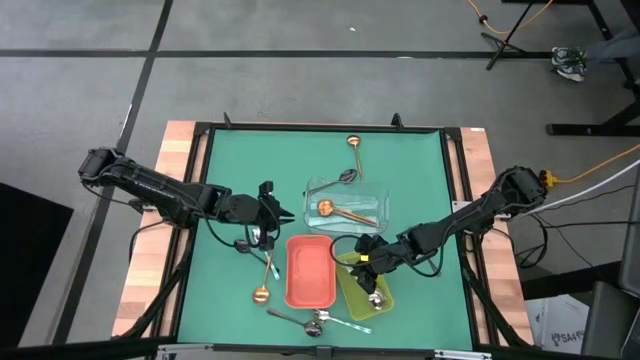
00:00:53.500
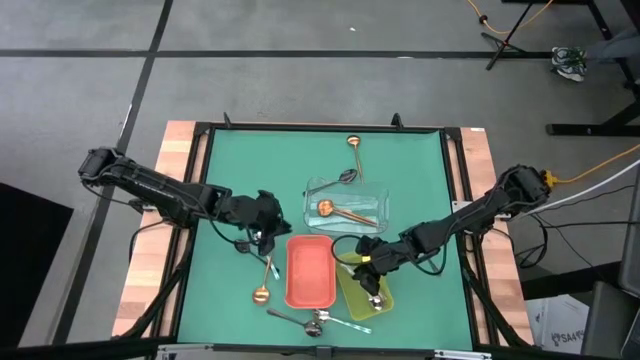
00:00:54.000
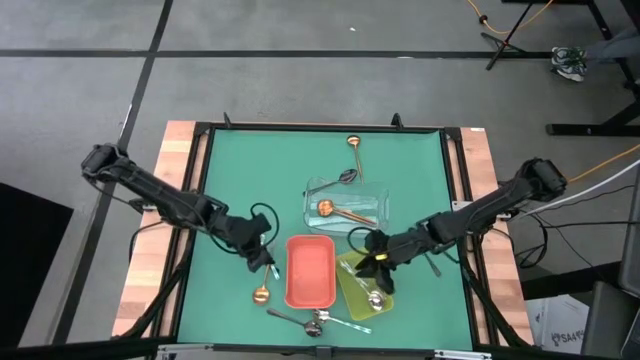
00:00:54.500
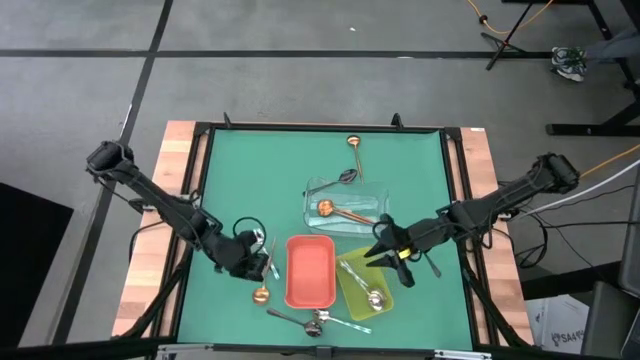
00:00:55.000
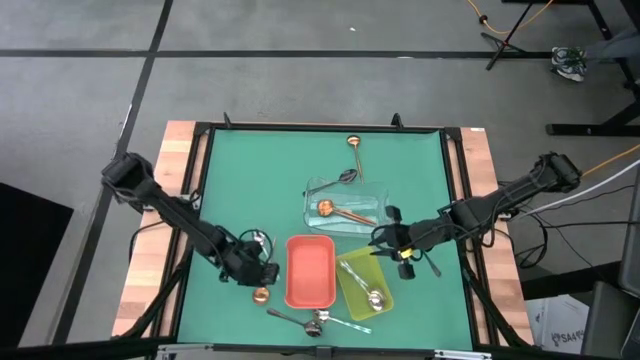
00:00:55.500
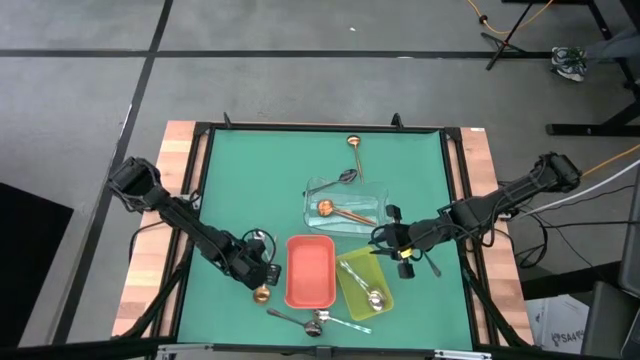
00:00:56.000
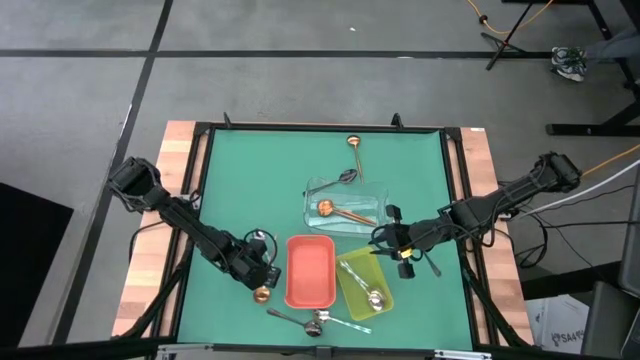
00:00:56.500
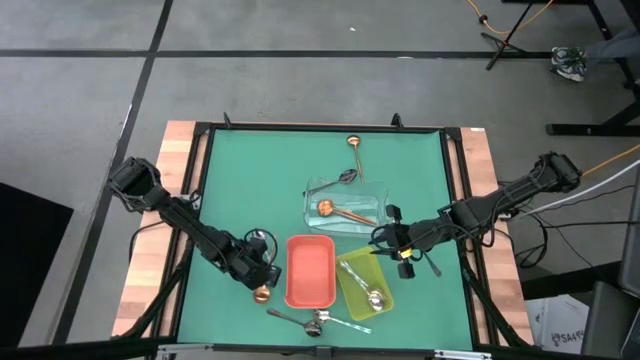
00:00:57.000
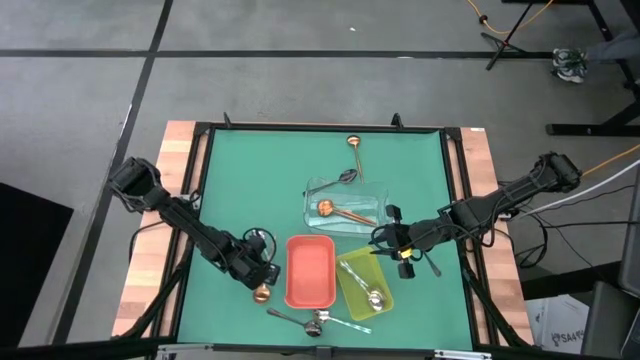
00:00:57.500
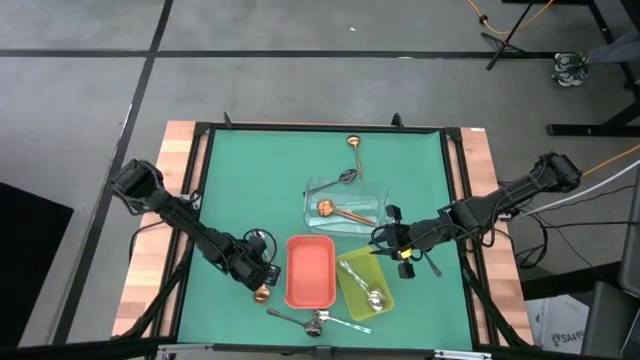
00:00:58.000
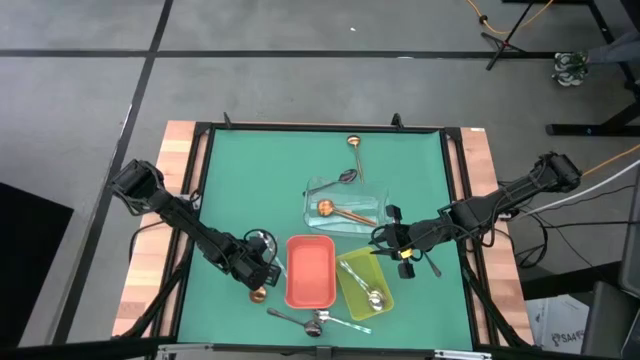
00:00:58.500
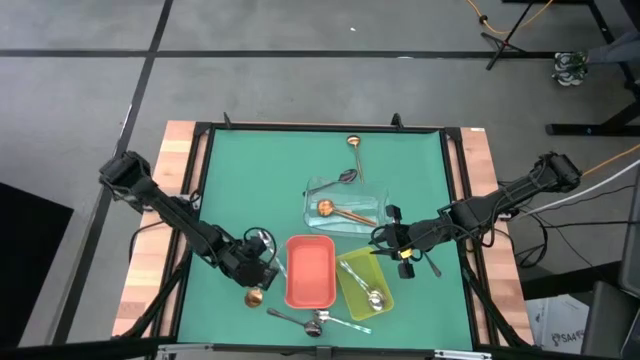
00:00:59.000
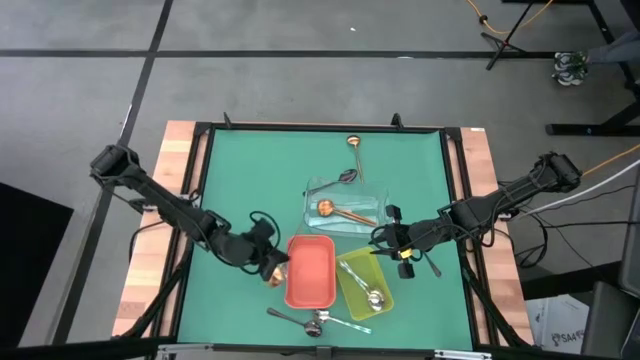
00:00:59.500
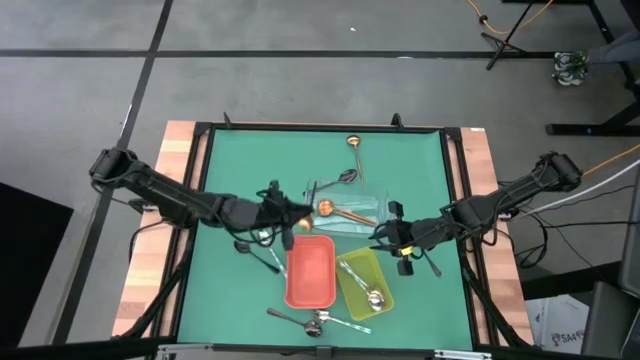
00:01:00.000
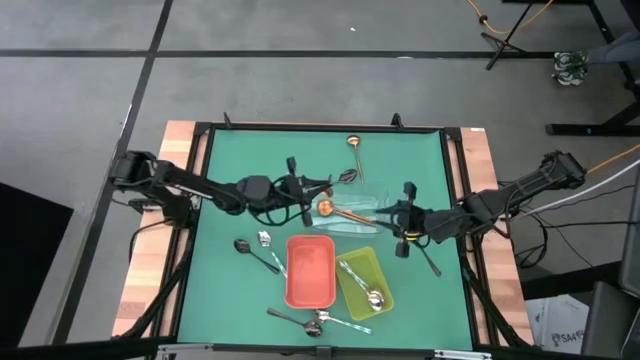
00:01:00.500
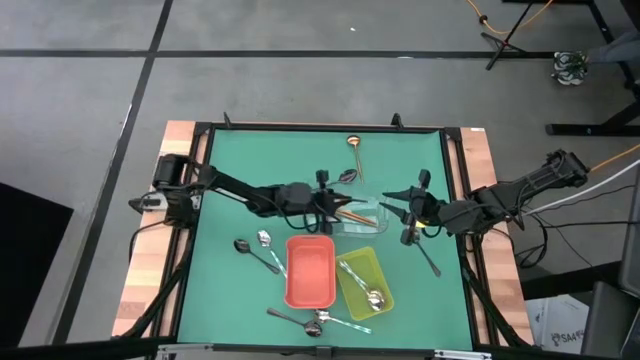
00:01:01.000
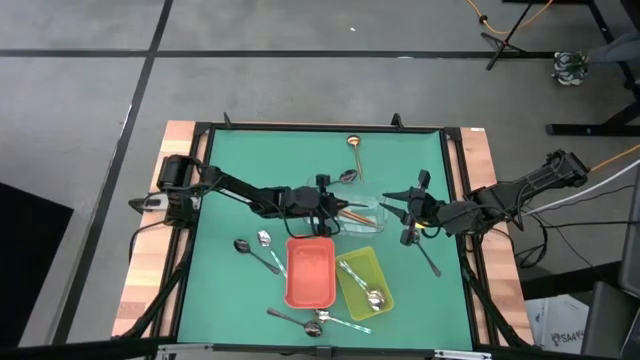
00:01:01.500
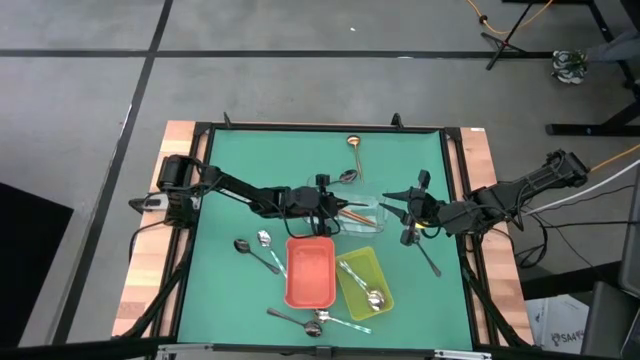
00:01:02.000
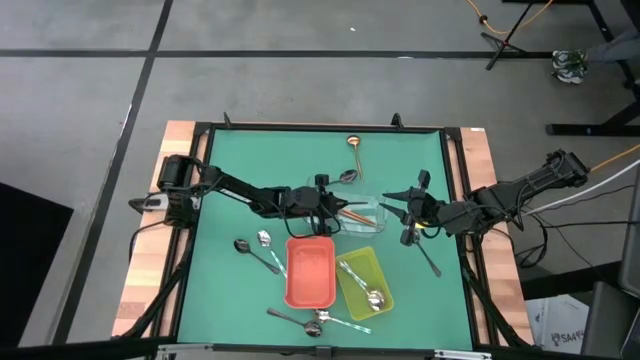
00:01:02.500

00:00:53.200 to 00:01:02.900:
Task: Sort silverware by color (type)
Put the gold spoon into the transparent bin

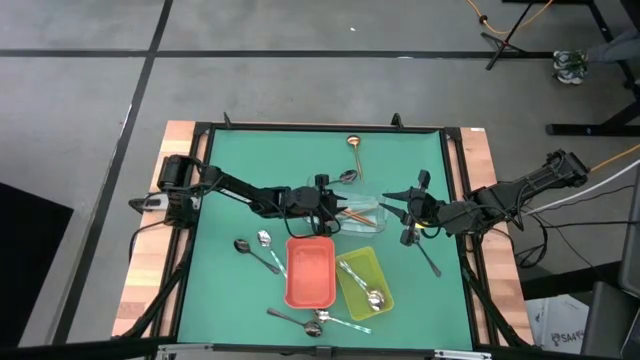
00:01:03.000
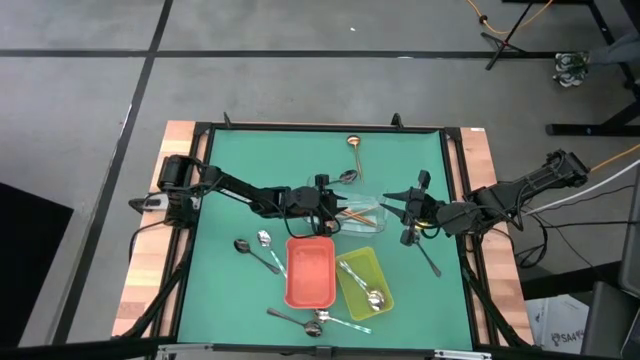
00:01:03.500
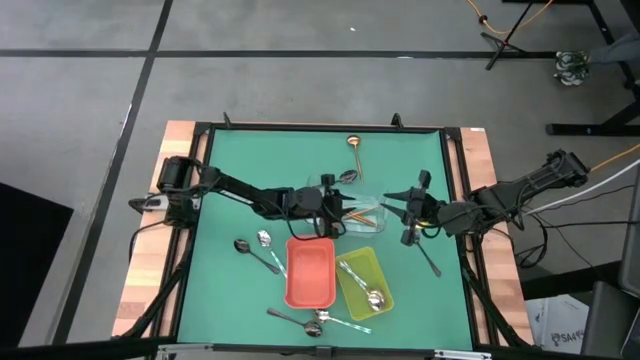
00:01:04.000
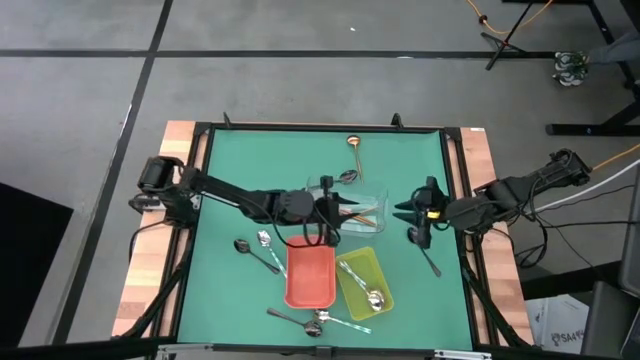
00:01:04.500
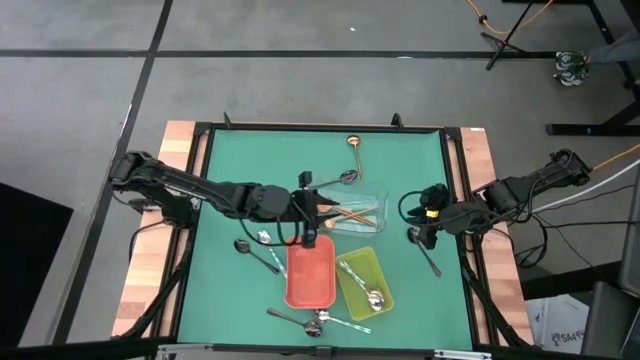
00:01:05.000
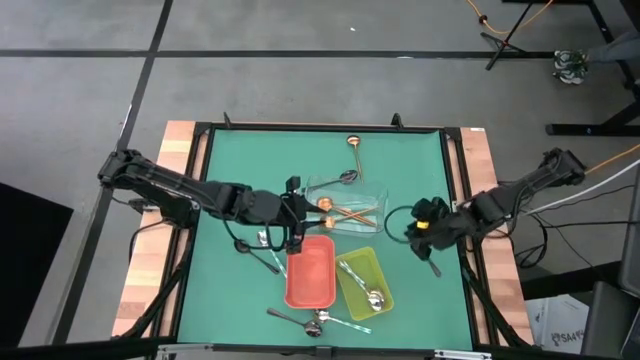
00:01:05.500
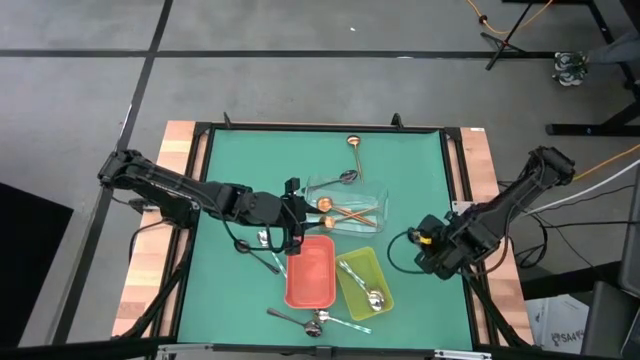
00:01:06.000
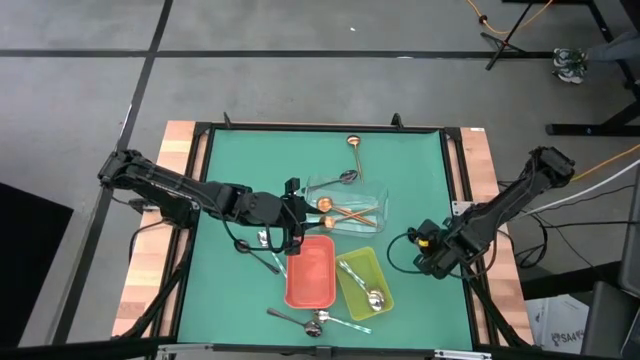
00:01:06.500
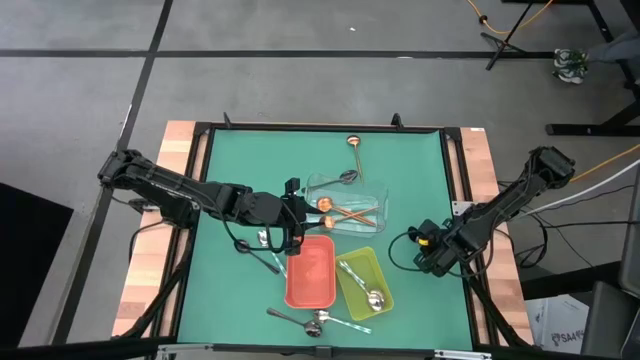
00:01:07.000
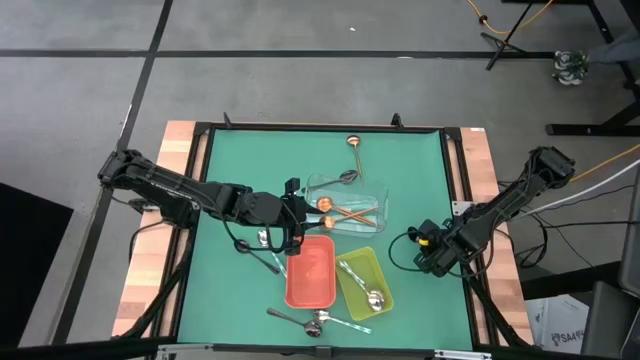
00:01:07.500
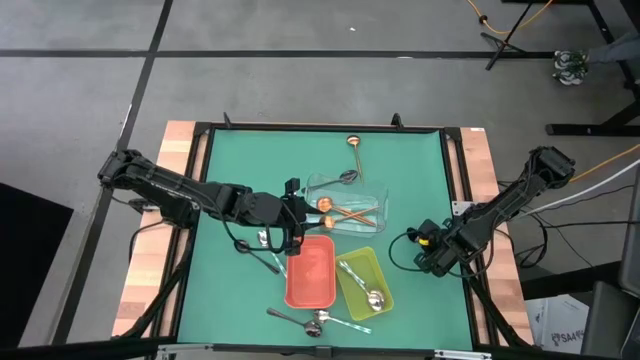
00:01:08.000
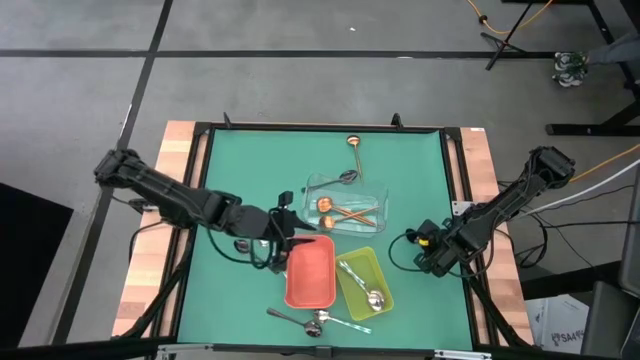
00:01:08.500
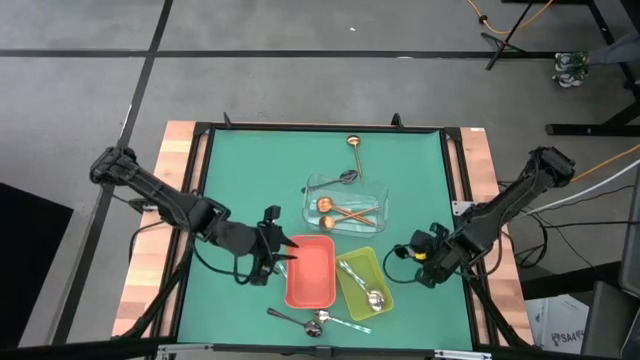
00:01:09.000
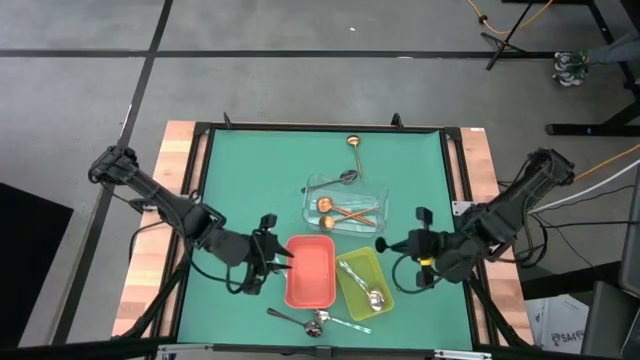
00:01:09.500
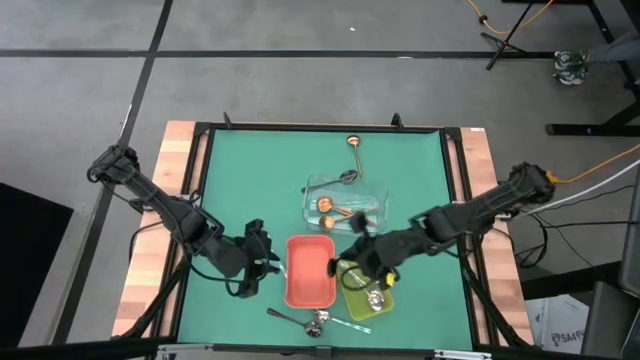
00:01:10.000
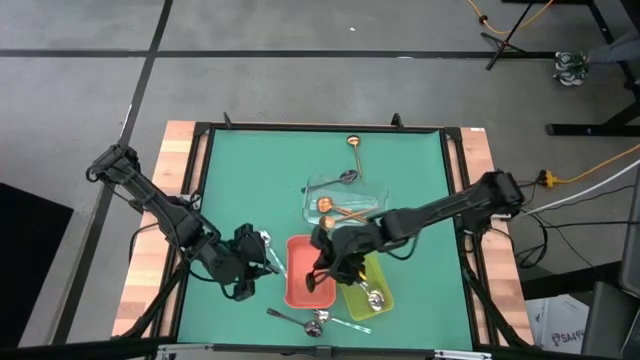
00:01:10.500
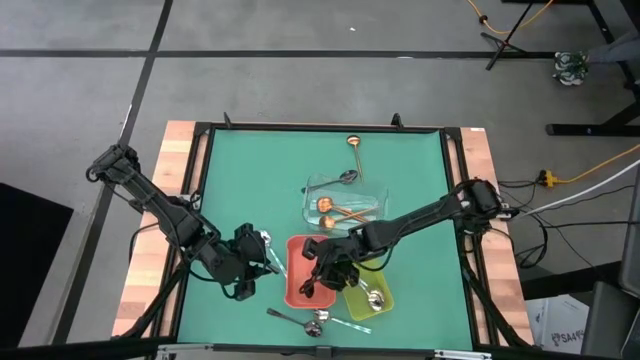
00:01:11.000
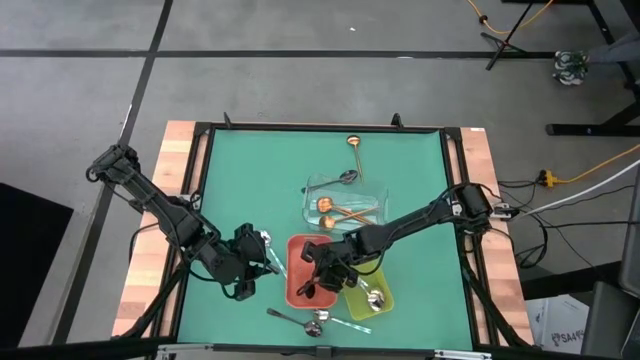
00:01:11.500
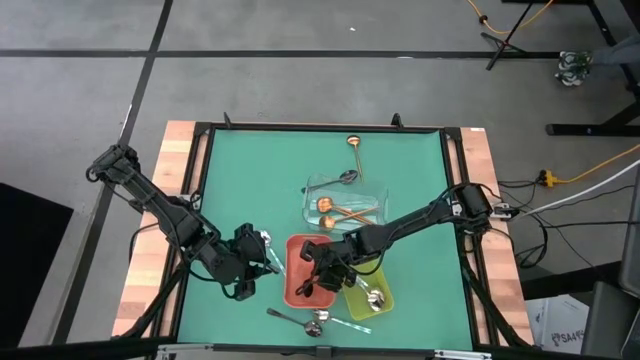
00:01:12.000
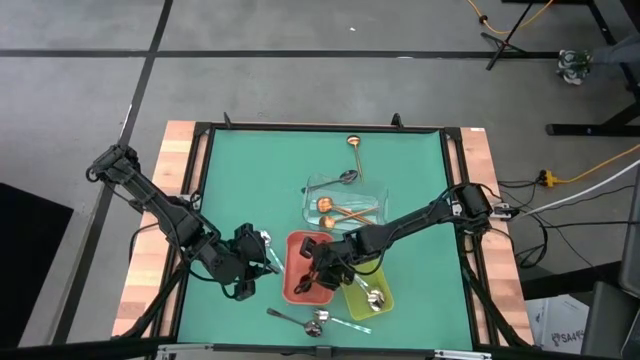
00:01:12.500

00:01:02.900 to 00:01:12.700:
Put the black spoon into the orange bin

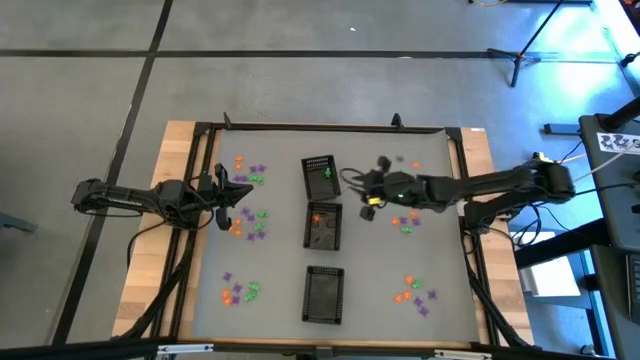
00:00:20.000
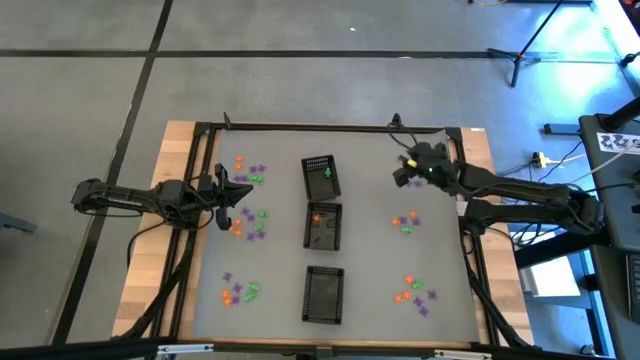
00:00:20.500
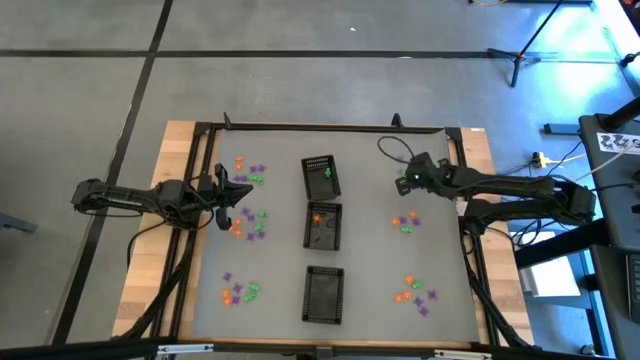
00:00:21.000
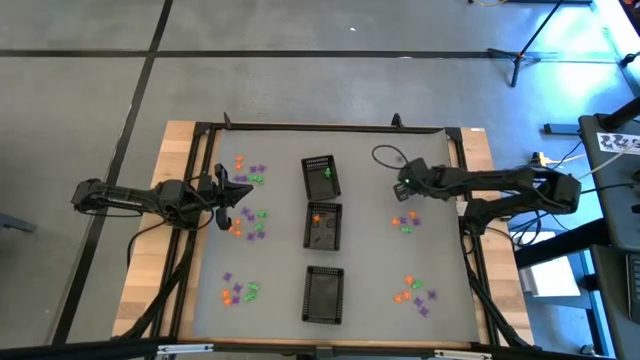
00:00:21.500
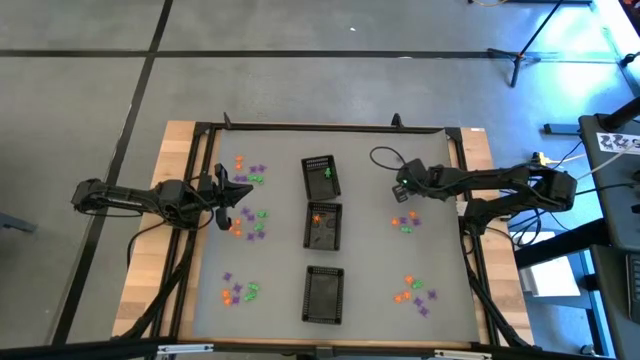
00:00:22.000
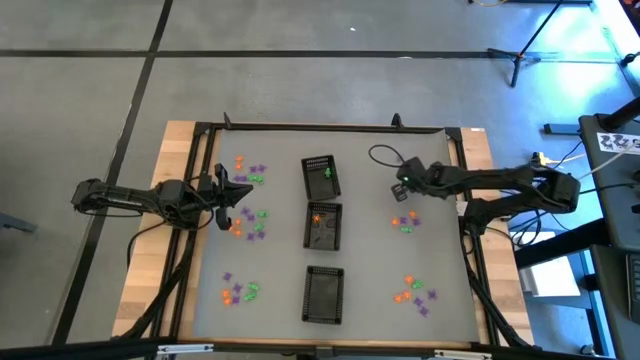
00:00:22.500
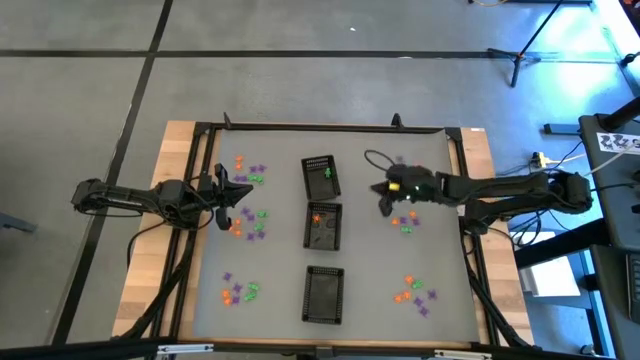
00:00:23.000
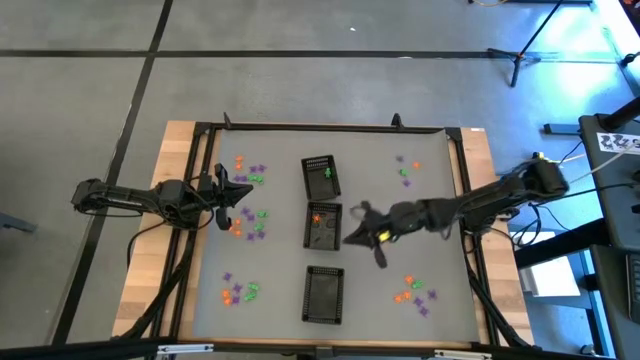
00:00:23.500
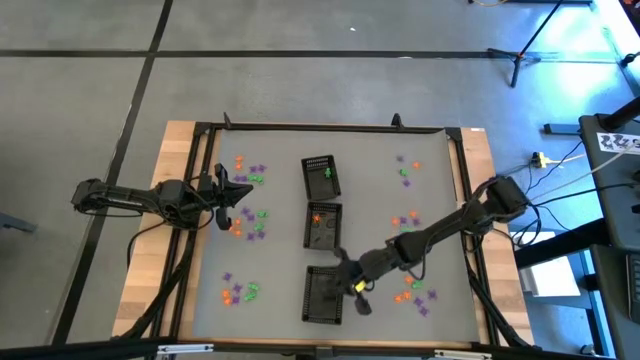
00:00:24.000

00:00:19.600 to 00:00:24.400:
Task: Sort Halloween decoration
Put the violet spider toy into the bottom black bin
